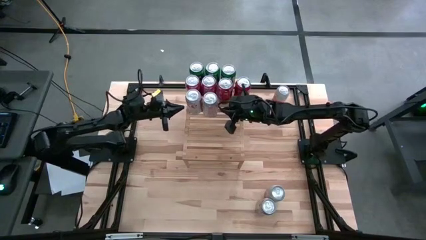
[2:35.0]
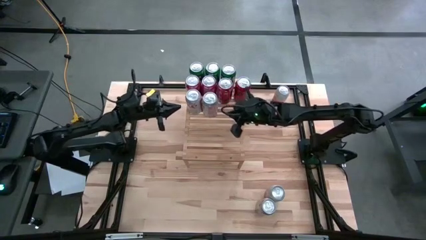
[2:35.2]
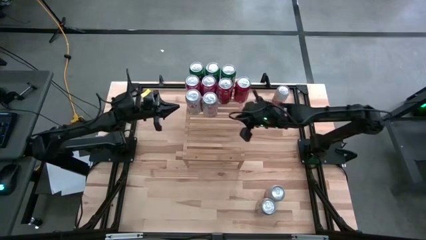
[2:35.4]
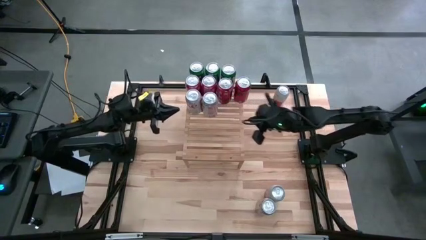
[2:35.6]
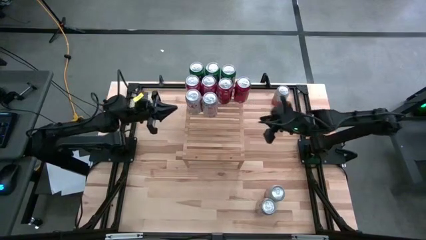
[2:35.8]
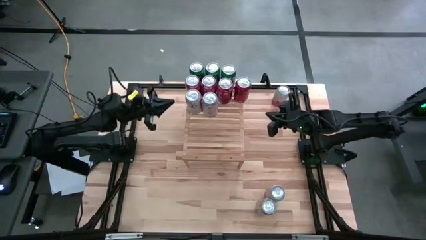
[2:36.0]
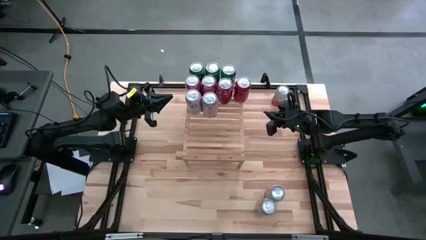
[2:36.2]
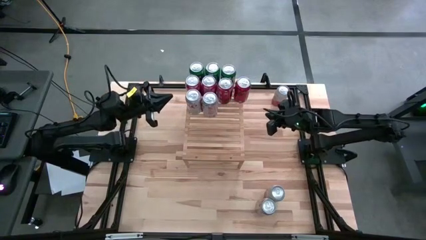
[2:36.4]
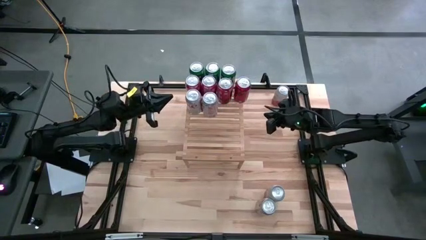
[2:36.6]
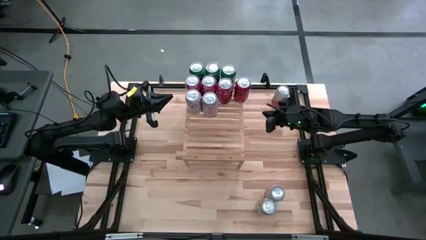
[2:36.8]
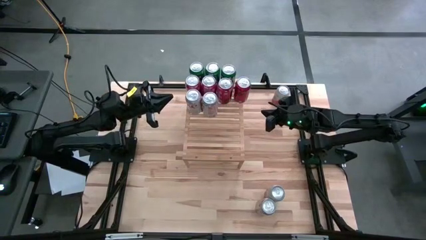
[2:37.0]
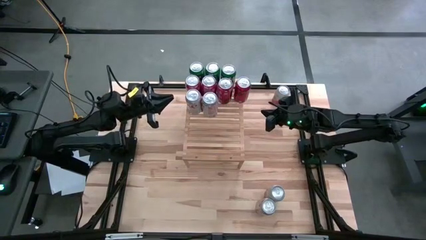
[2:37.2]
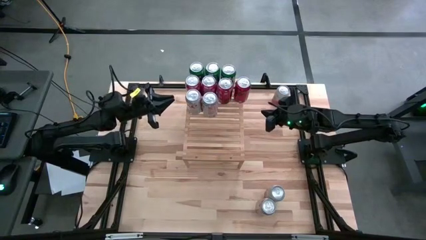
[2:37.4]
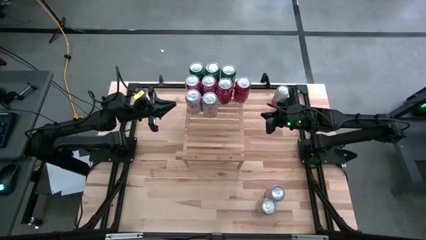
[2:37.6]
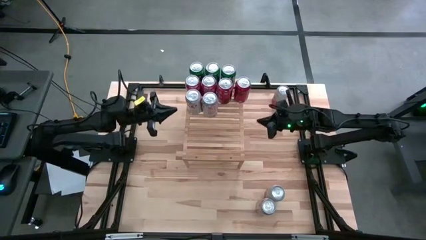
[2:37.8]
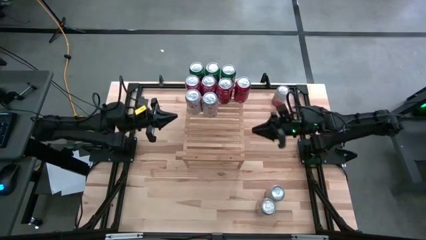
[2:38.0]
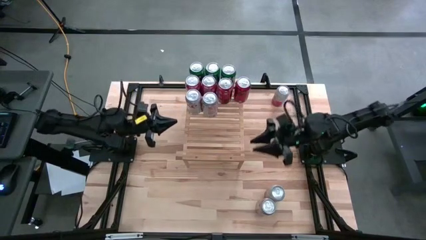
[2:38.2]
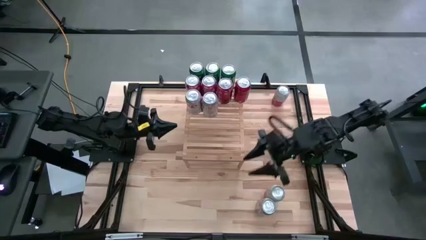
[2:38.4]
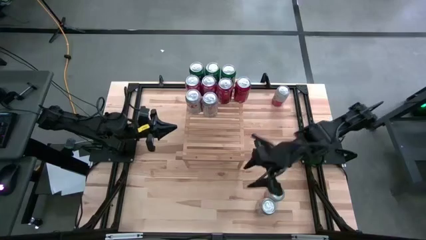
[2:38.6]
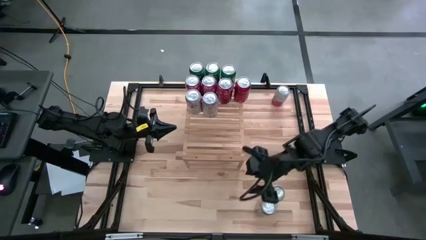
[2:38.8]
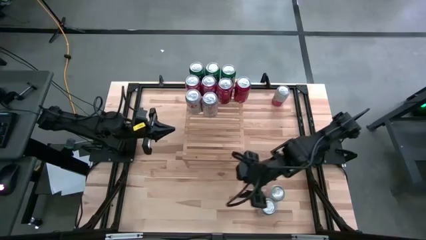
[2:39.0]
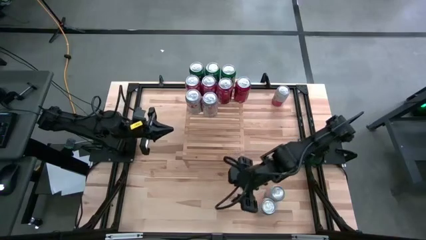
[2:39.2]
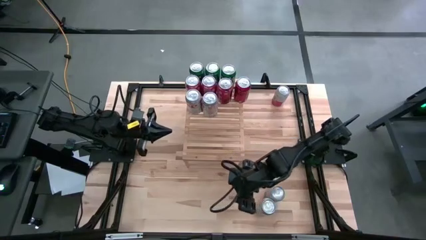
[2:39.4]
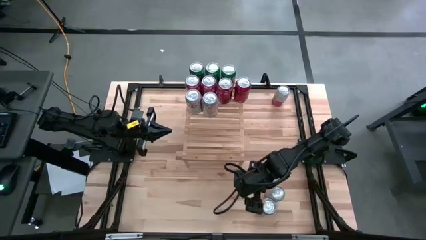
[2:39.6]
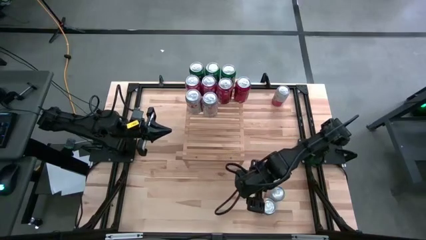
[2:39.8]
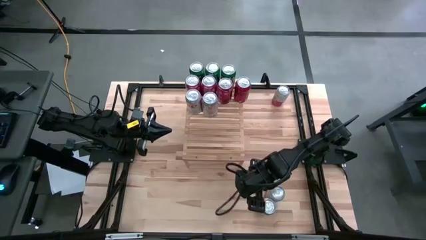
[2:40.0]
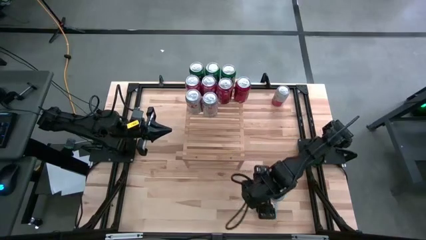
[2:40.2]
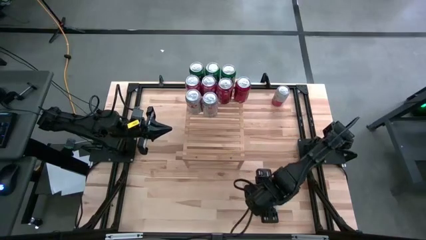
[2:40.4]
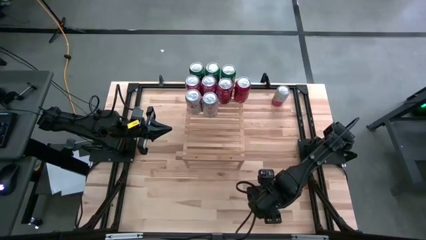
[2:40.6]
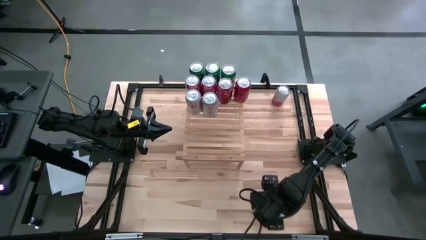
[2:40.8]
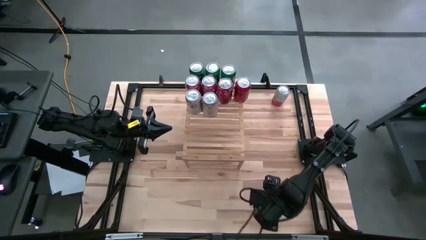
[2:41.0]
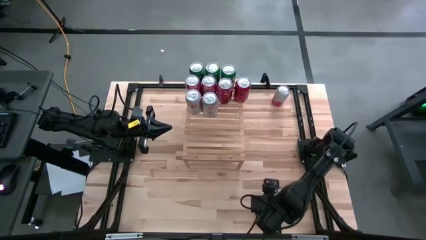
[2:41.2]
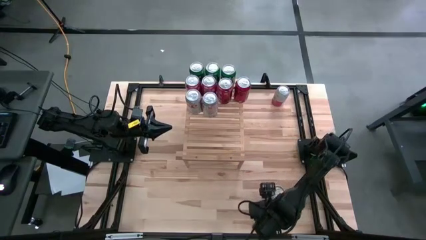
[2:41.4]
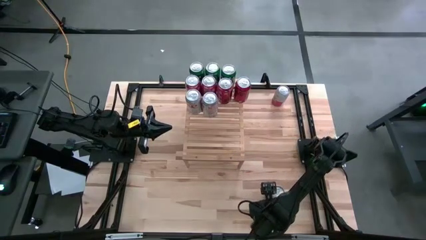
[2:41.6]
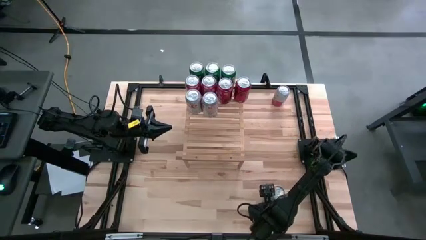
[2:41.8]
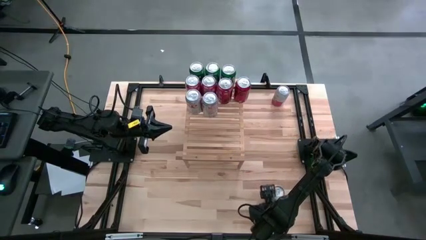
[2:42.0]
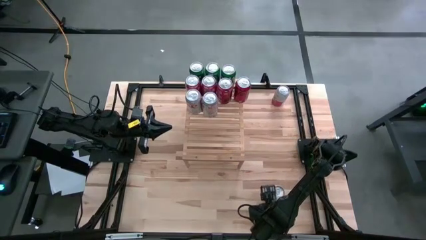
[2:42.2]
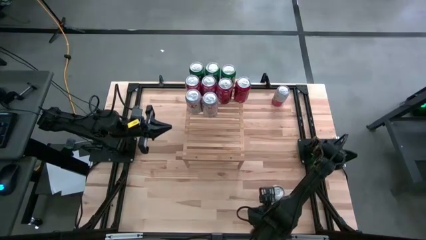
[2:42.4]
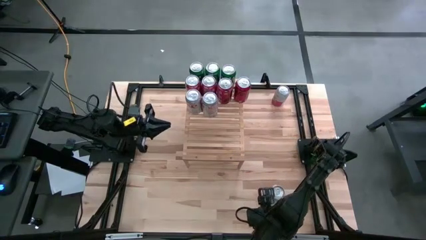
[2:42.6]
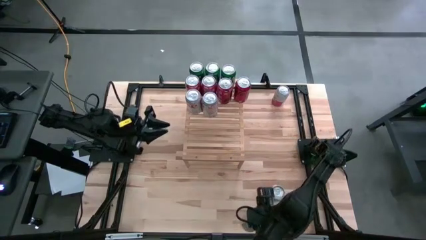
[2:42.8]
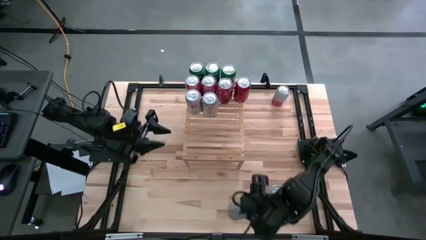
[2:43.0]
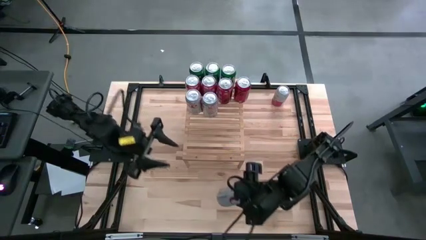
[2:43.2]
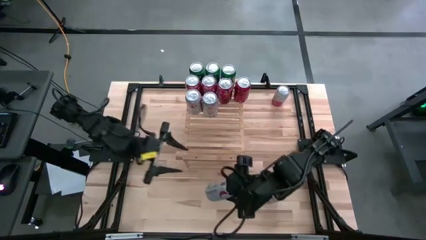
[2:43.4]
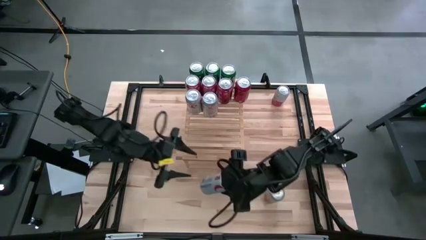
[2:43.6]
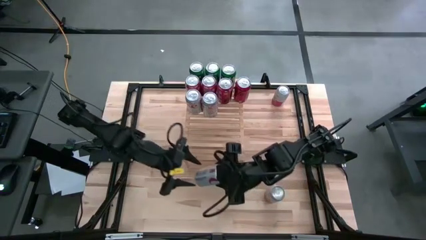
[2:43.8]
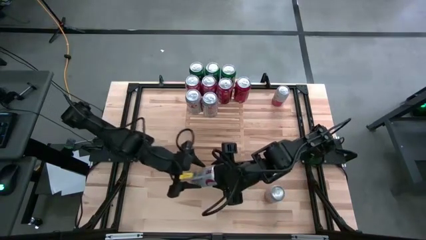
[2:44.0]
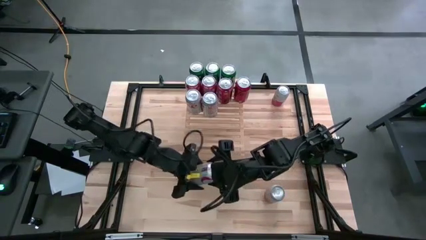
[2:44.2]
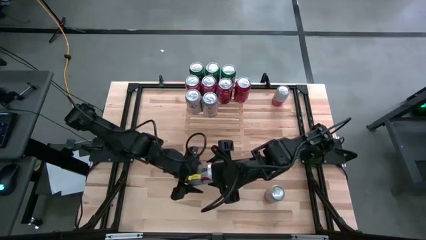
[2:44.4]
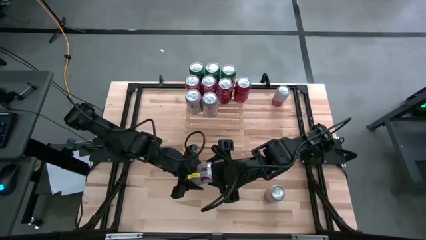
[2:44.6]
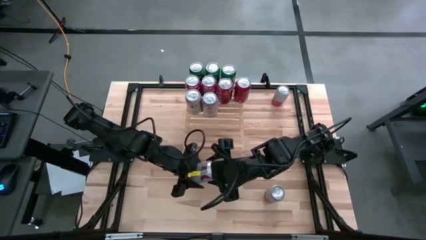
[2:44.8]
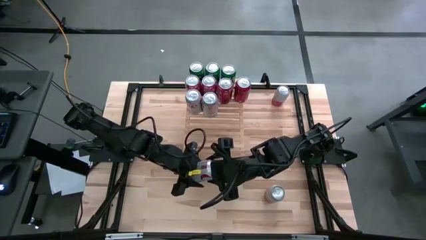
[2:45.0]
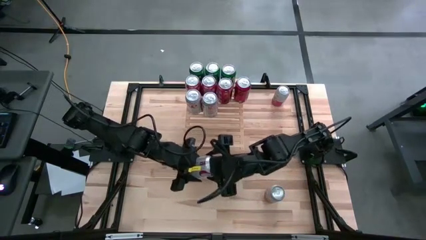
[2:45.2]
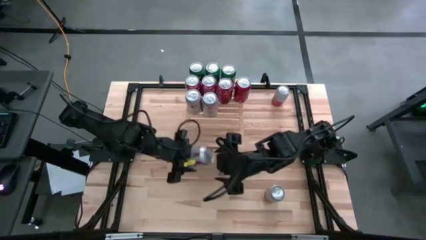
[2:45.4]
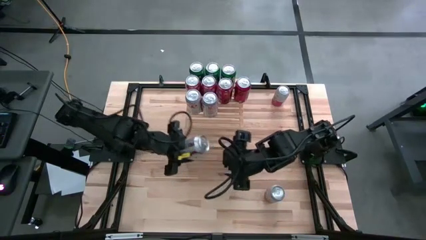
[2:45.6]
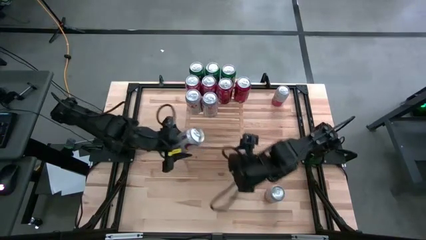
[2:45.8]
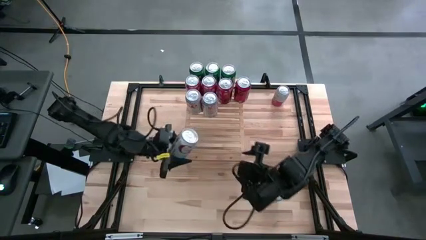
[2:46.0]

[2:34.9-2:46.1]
Task: Place canned beverage on shelf
Put the top silver soda can on the shelf aligned with the other silver soda cans

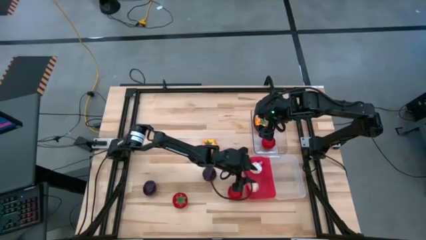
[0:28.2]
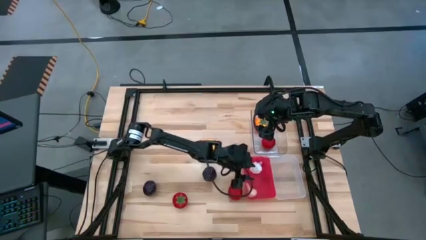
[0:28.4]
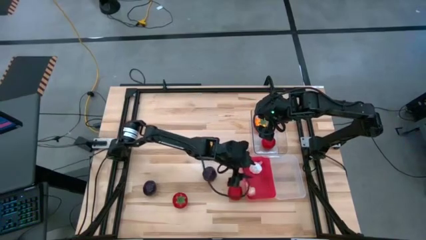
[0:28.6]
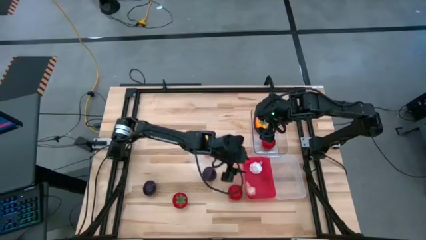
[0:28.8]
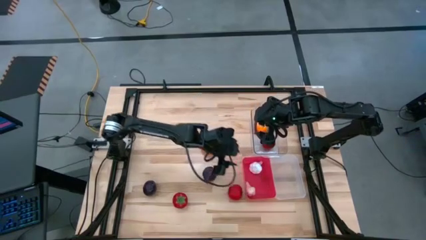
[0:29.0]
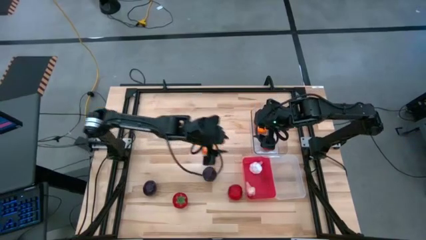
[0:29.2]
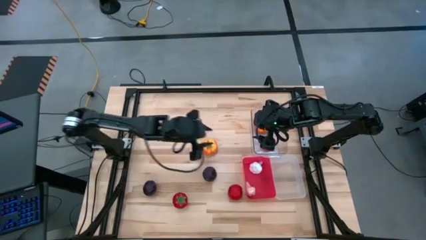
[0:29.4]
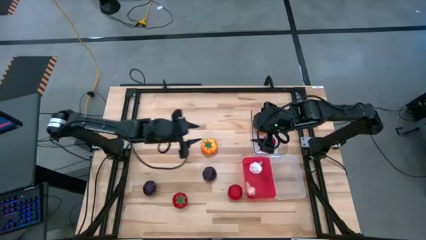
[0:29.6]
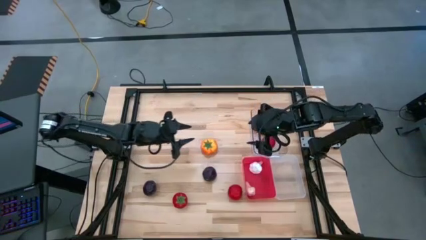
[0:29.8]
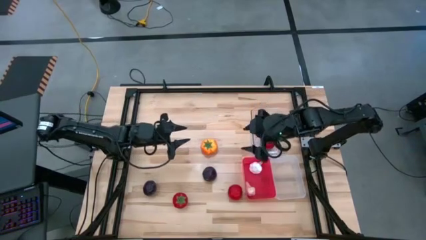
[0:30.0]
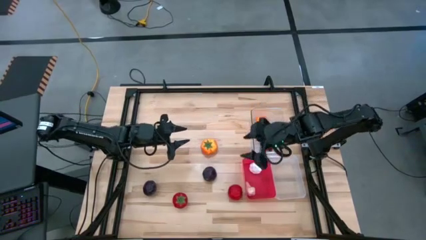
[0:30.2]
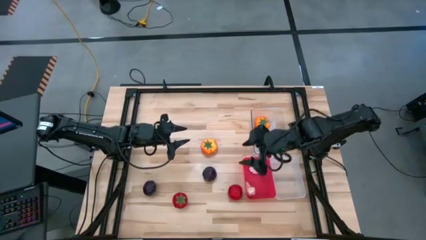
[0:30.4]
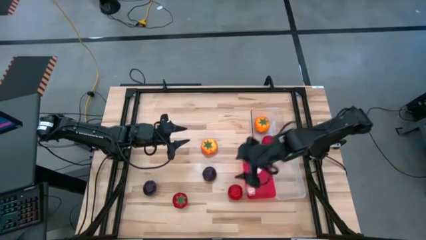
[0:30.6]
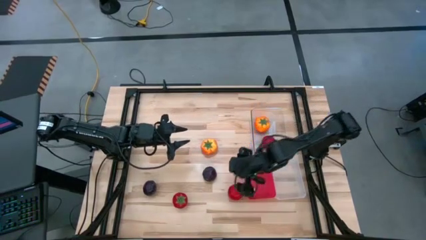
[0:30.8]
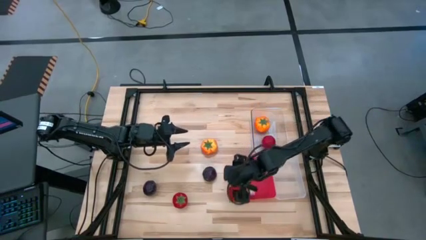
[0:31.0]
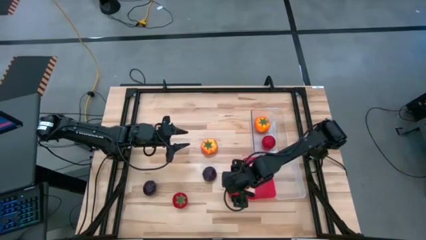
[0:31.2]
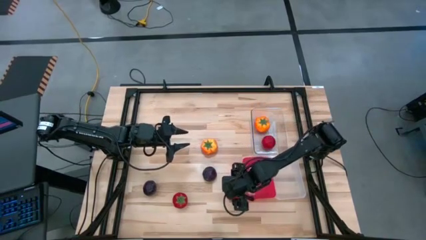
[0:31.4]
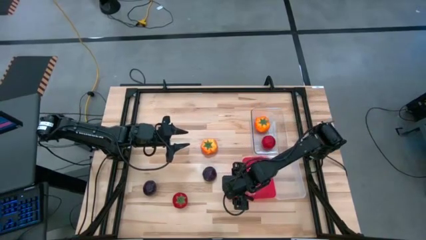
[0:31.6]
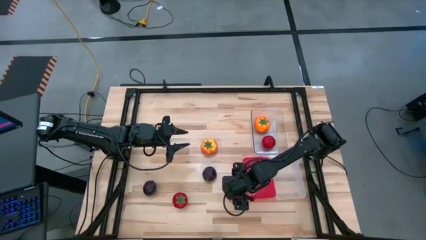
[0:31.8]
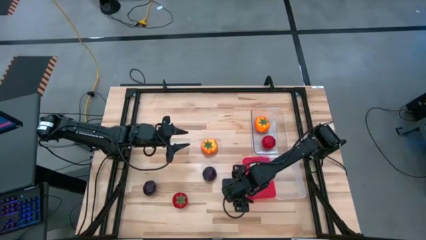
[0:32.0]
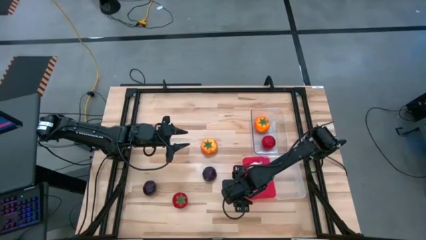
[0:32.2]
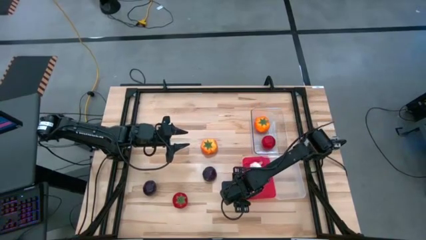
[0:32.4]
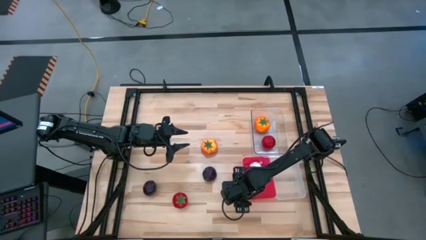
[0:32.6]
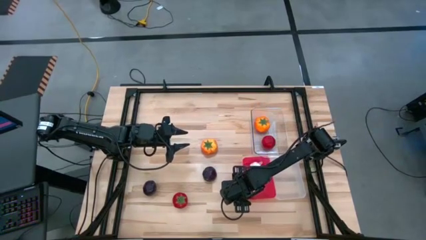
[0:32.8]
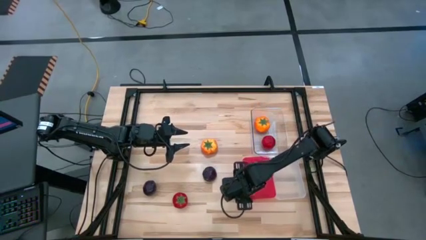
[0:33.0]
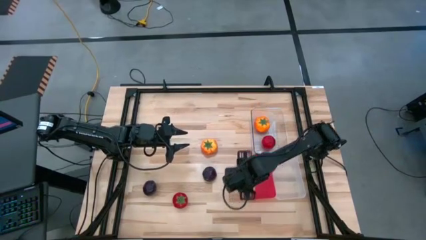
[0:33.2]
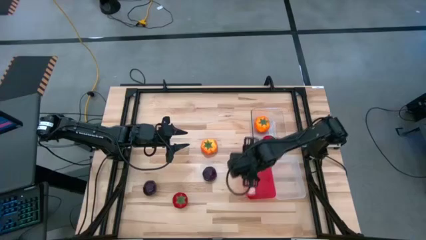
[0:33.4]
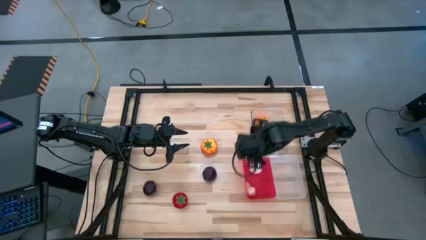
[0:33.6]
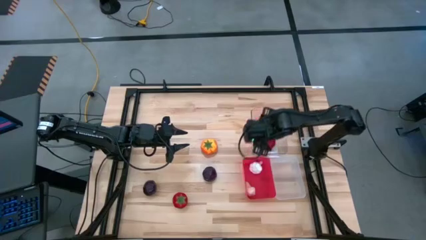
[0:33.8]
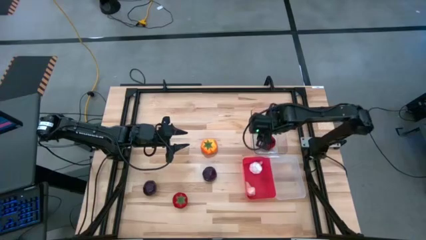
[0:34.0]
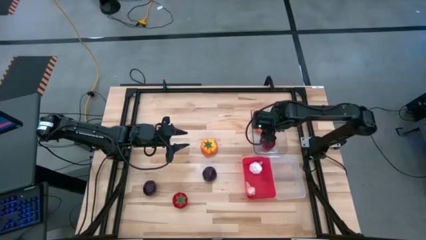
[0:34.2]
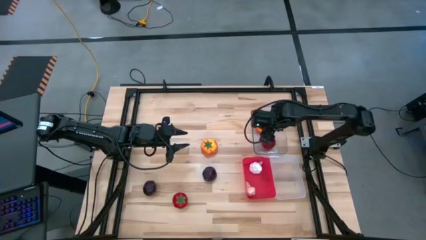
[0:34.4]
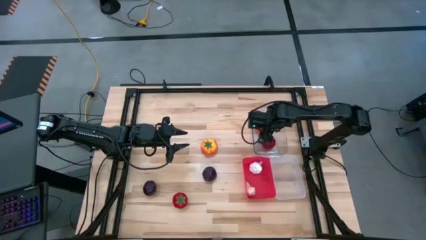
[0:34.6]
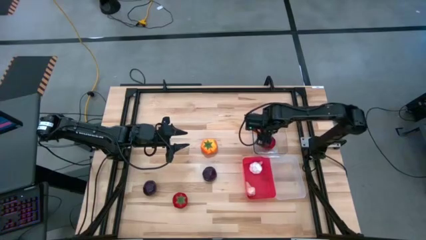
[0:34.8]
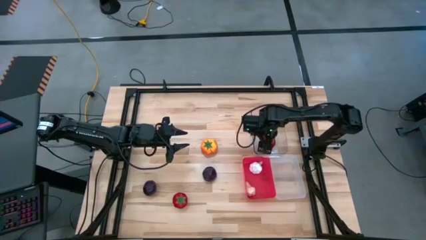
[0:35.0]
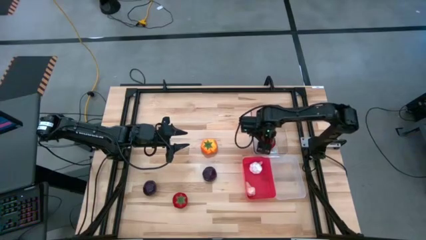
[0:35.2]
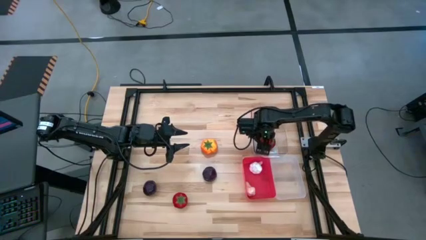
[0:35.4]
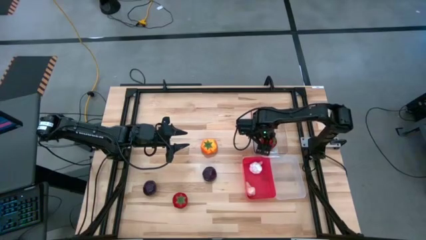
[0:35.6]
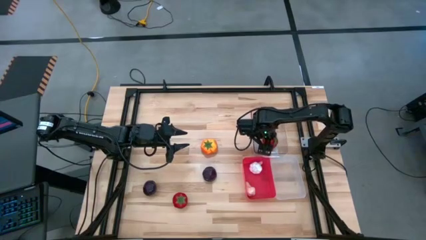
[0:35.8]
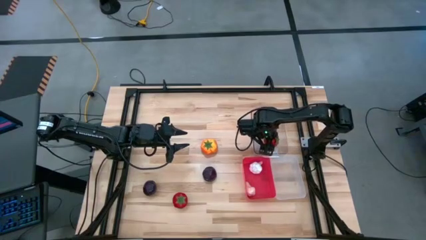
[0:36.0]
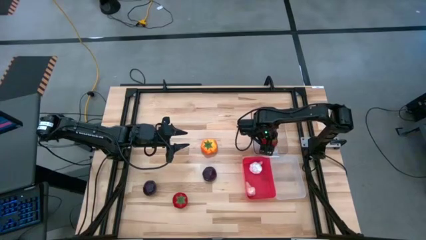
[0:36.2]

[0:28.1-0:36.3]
Task: Sort produce into baskets
Put the right red tomato into the top transparent bin
